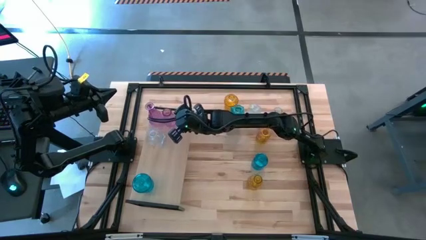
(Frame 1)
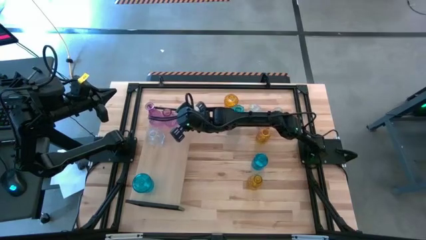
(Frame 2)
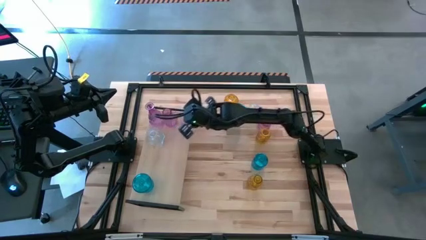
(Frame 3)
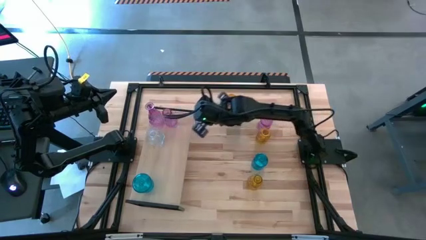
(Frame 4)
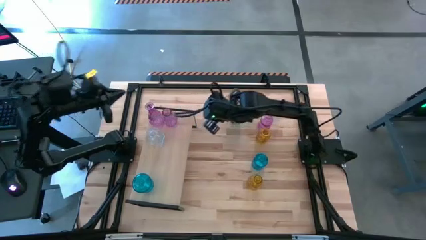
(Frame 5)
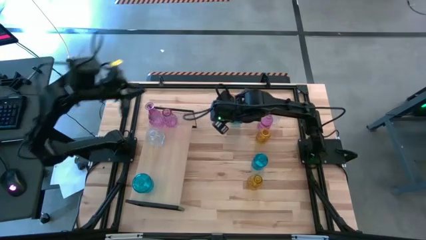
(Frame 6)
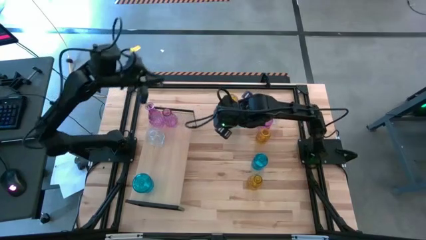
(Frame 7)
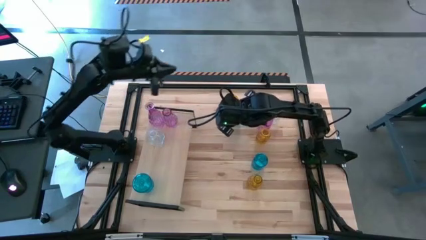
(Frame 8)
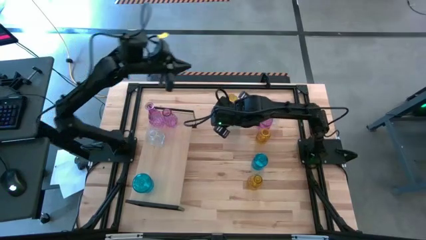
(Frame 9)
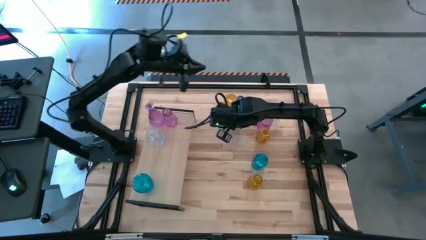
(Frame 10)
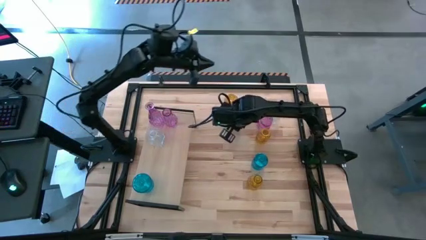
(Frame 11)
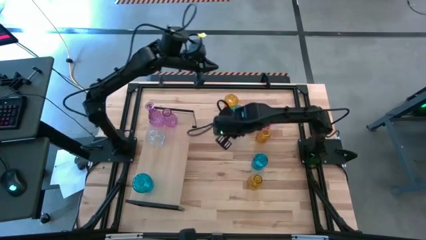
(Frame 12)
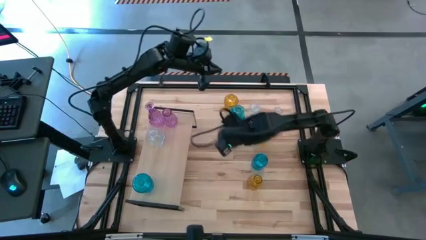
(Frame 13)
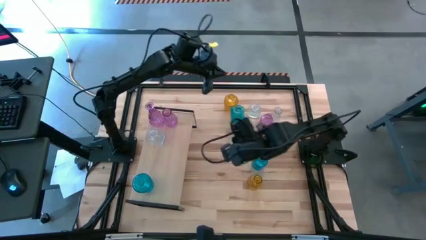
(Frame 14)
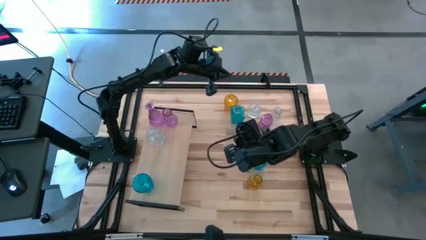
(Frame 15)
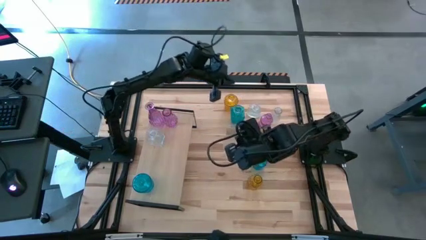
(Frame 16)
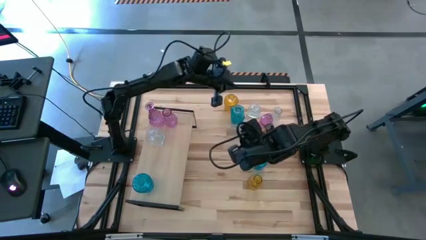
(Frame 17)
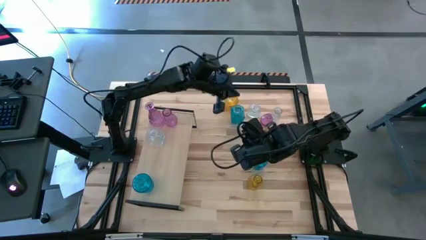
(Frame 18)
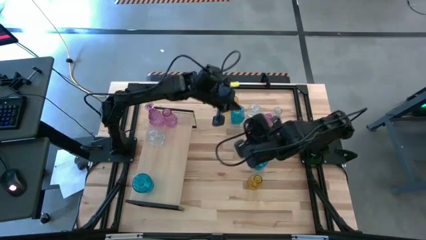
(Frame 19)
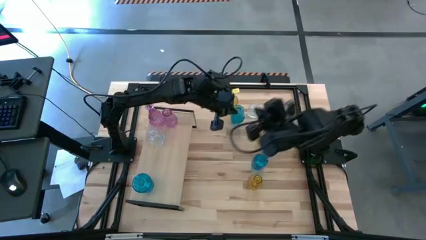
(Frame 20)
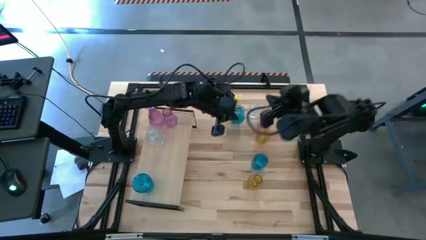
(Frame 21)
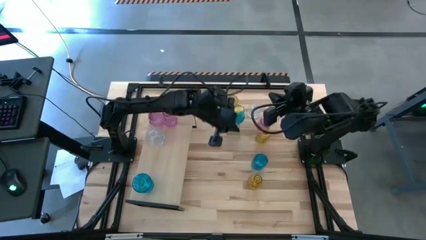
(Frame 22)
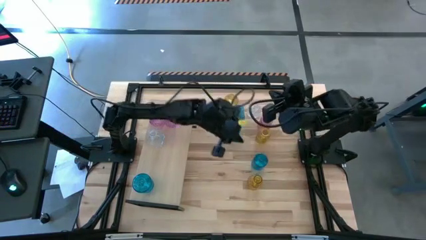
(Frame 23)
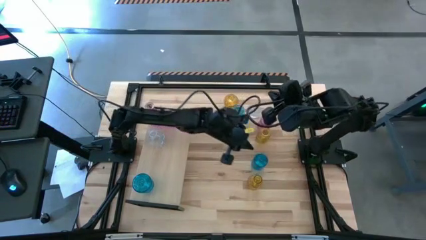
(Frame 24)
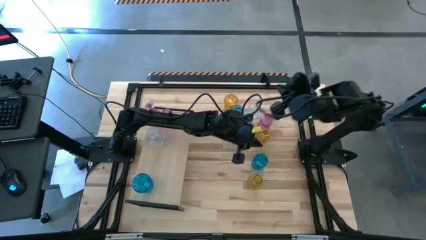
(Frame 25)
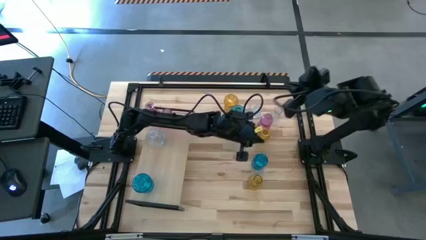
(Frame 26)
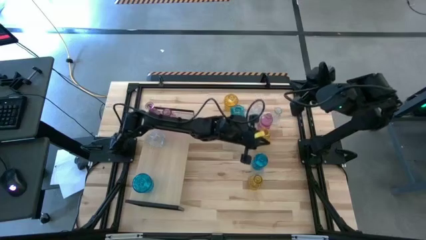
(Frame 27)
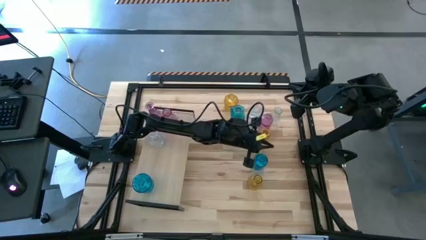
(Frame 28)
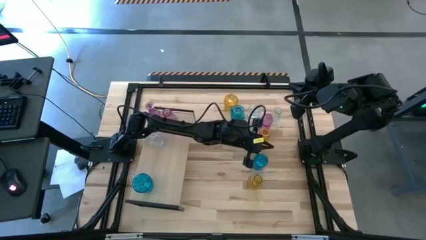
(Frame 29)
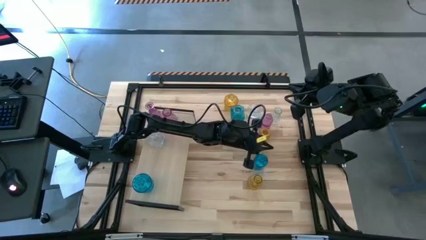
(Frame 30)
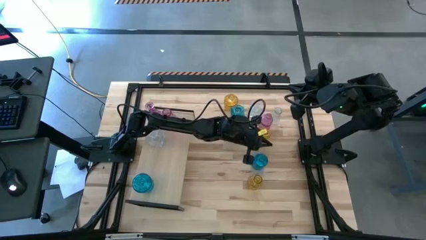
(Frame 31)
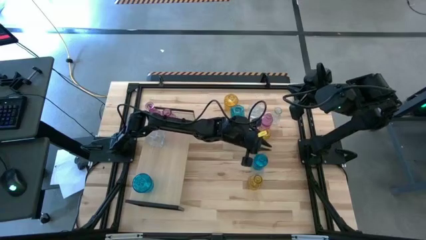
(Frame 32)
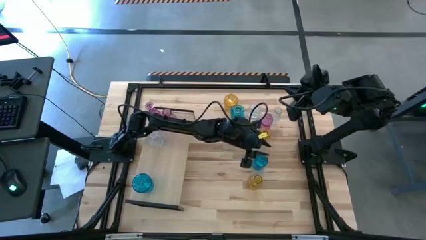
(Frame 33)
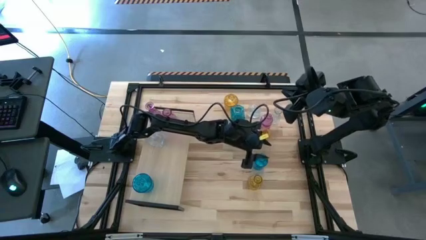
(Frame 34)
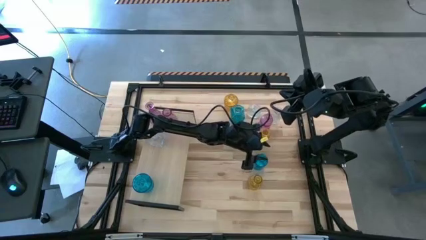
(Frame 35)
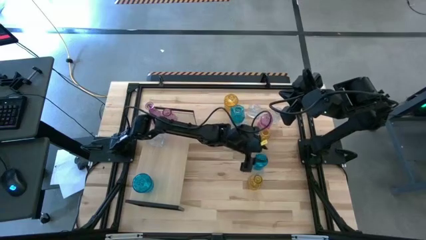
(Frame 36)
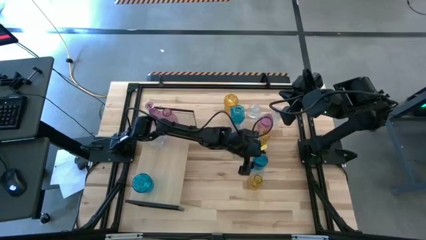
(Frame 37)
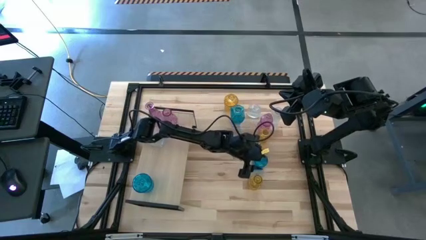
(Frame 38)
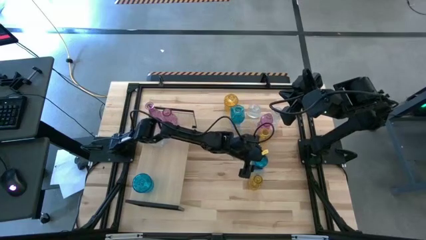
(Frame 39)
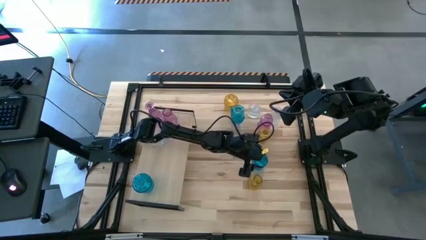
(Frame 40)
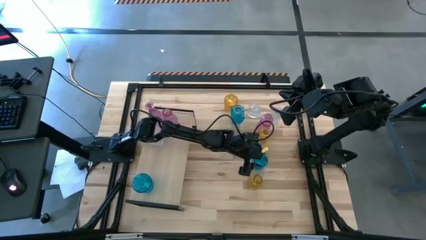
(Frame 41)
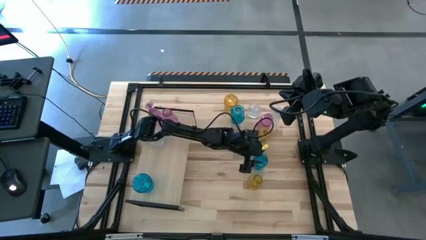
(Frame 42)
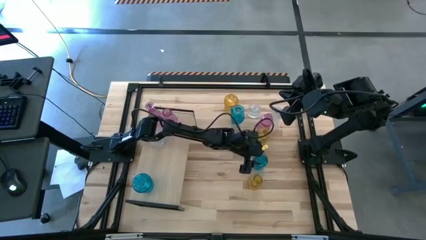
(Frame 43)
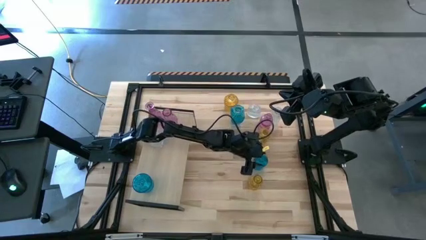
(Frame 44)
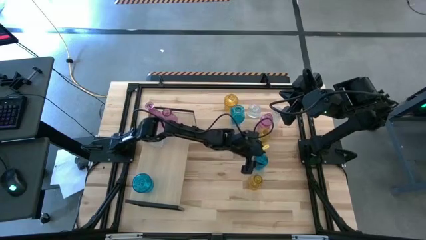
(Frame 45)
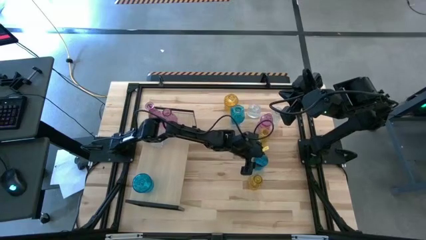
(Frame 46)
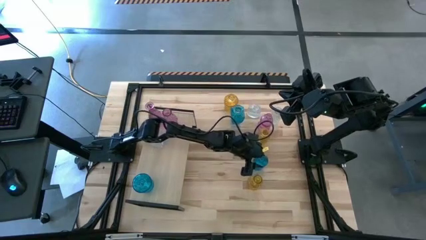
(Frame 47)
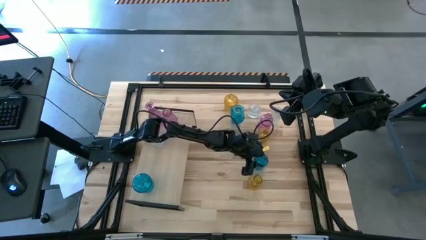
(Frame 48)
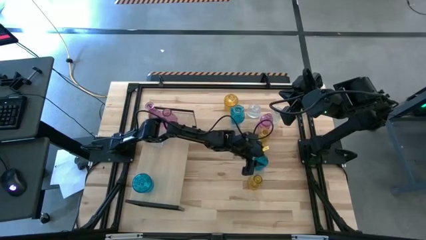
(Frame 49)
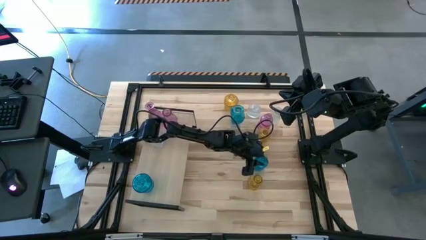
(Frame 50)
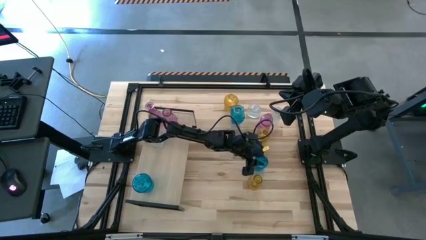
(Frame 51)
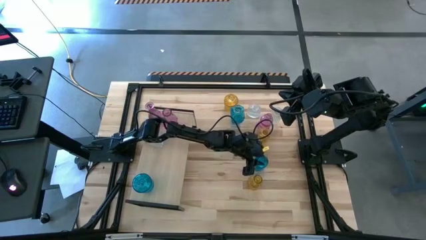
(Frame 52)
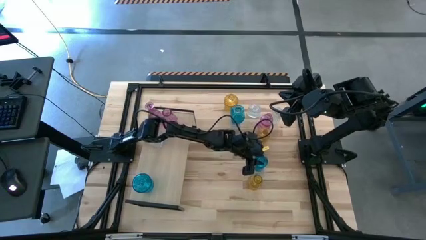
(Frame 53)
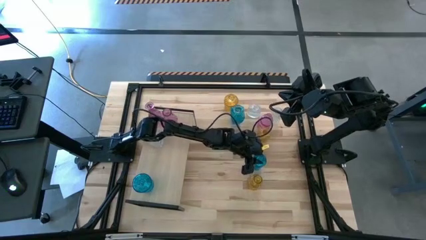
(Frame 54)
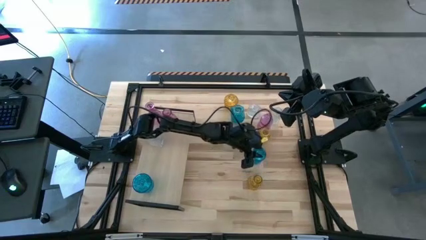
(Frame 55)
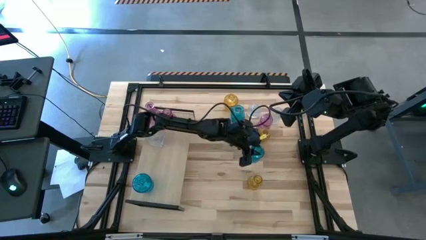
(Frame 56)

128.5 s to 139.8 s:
Task: sort vases onto shelf
Put the bottom blue flower vase on the shelf

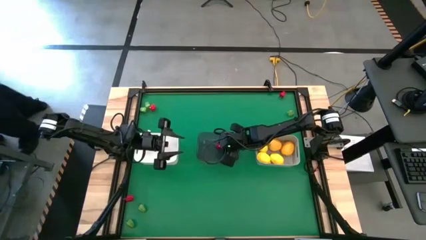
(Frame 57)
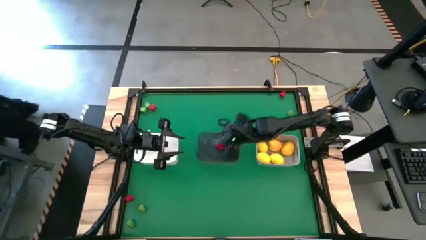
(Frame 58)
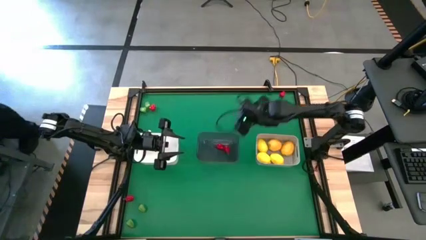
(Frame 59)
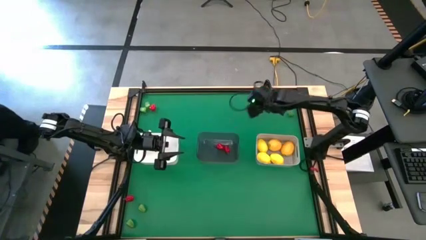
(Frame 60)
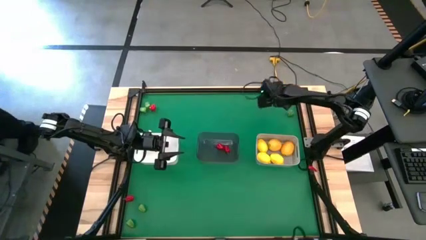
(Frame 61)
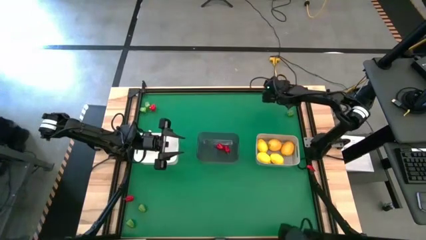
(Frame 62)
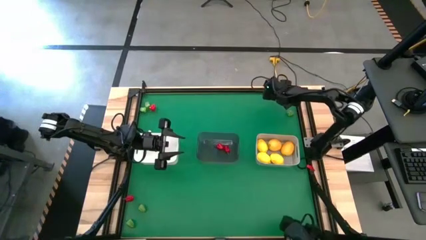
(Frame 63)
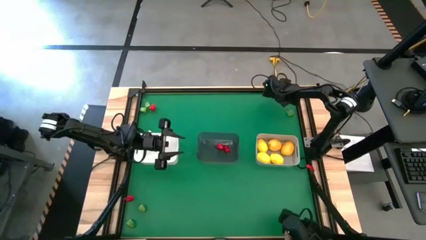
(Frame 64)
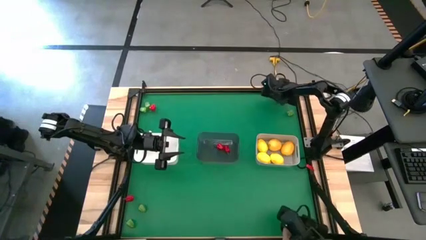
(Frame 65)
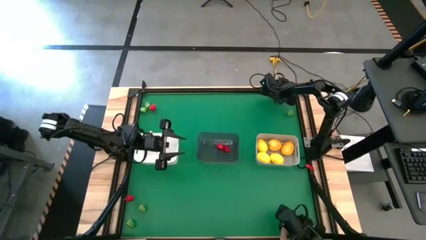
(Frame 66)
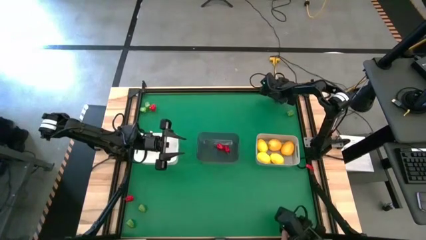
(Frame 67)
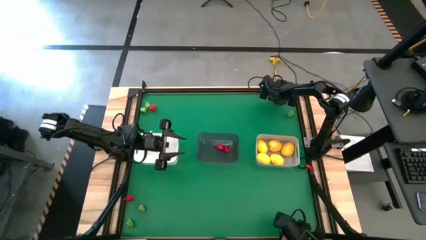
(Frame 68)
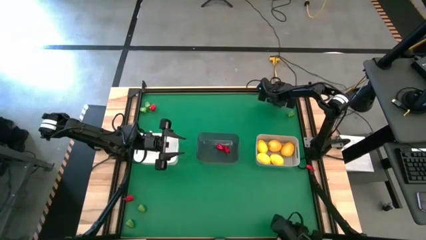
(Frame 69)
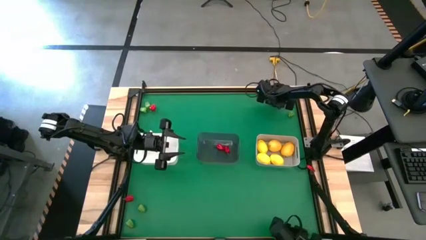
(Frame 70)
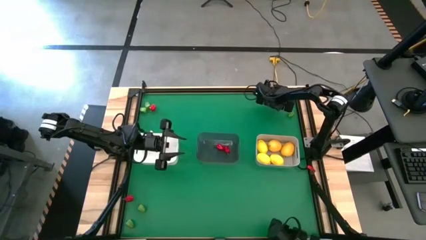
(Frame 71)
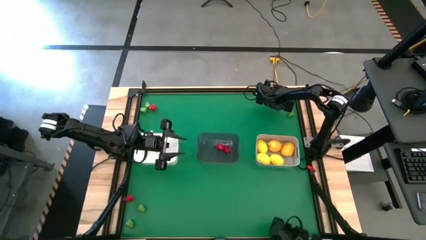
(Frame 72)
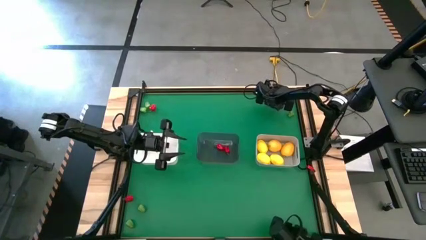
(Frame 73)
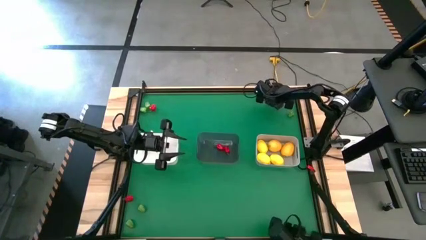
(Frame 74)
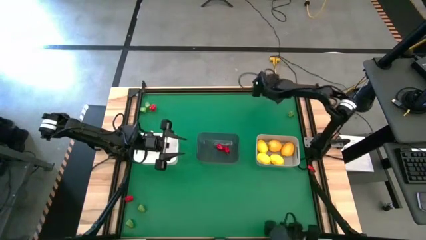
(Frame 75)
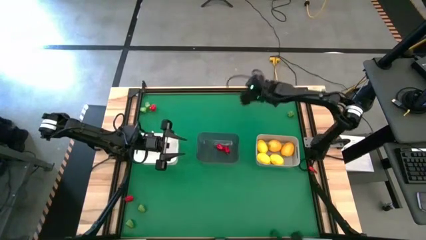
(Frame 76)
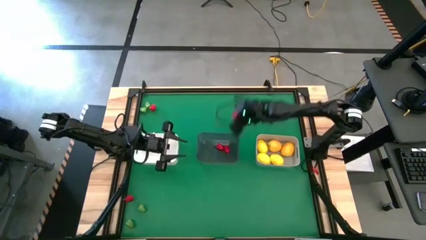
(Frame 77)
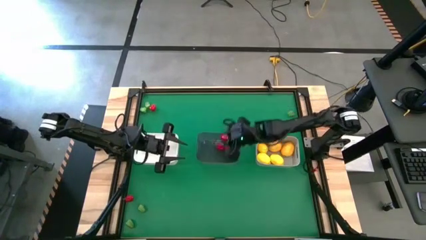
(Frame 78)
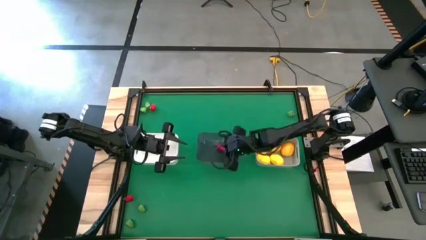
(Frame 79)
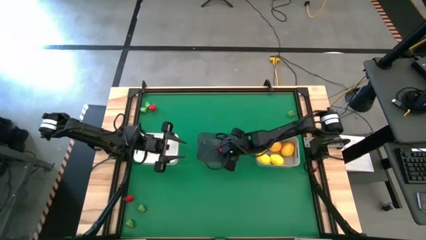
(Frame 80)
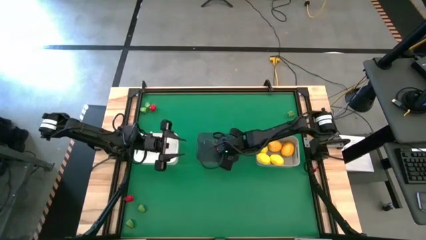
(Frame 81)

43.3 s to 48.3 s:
Task: Sort produce into baskets
Put the red chili pepper into the black bin
